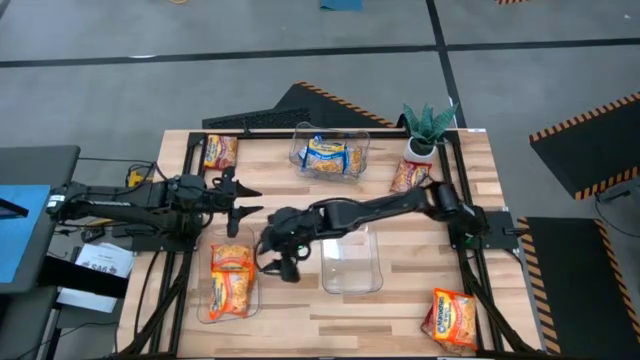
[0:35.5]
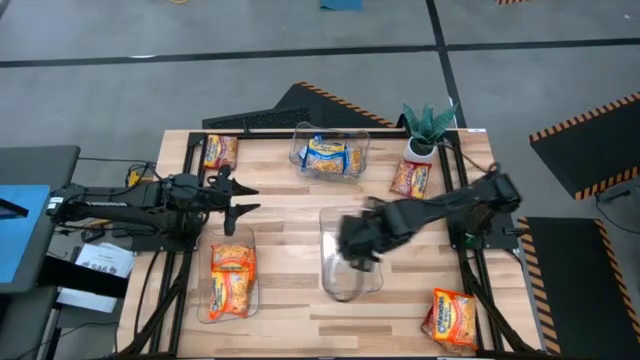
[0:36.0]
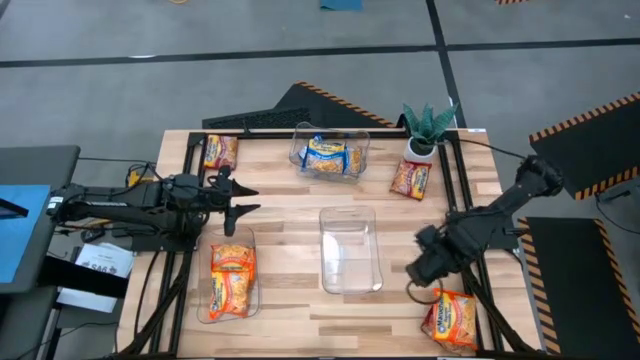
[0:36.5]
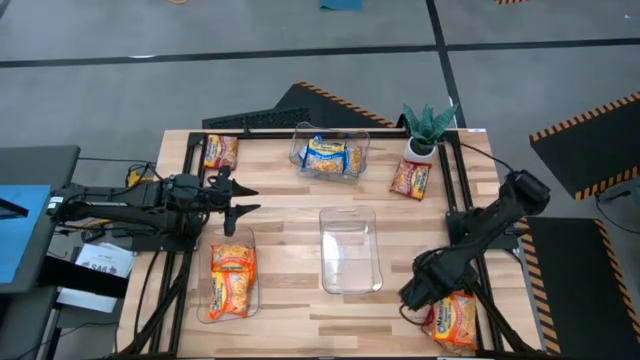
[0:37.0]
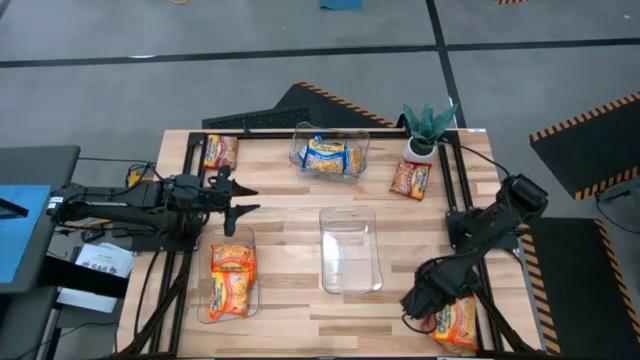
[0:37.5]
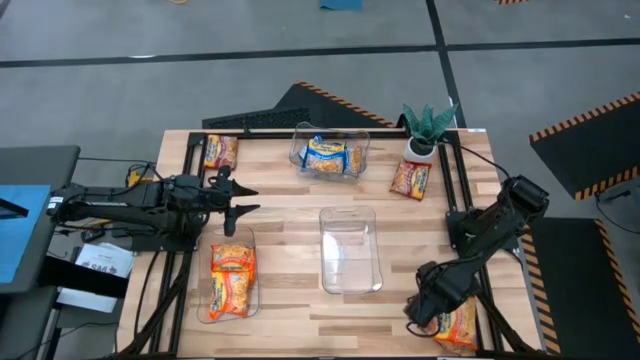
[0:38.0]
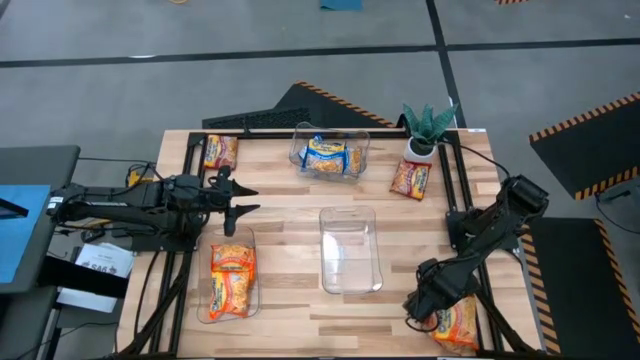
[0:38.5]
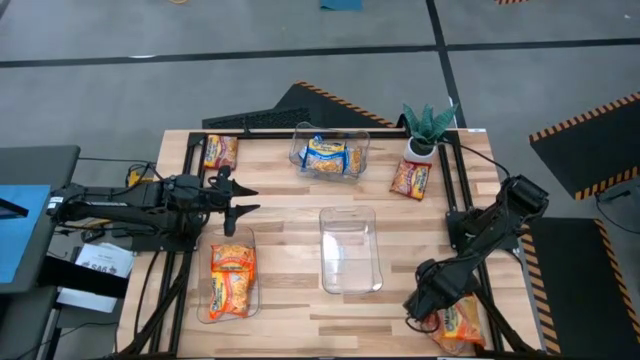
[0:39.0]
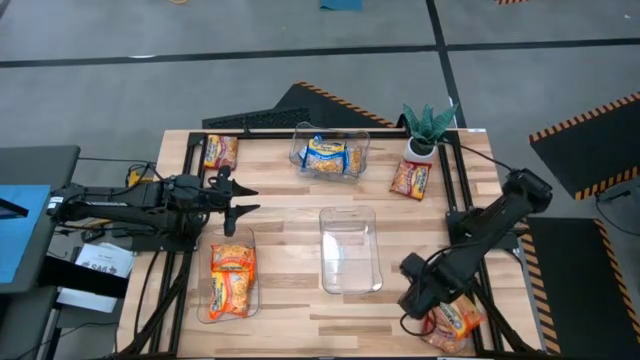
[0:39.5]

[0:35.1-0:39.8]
Task: Sort Maruchan noodles
Put the orange noodle pack into the bottom left transparent bin

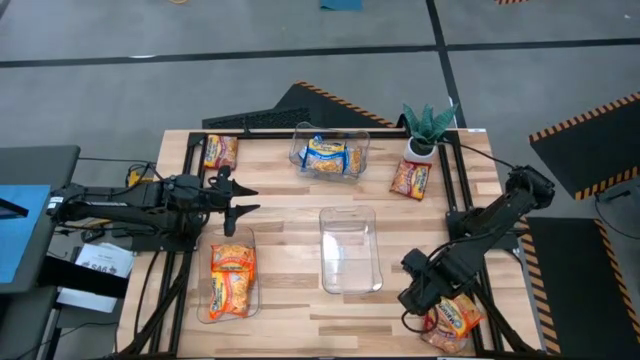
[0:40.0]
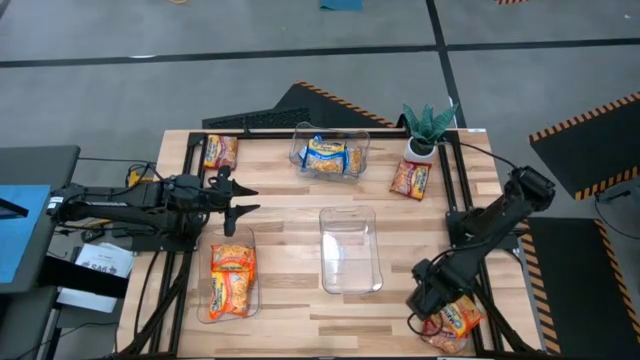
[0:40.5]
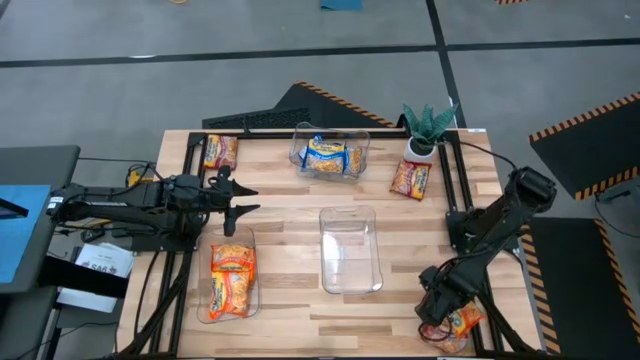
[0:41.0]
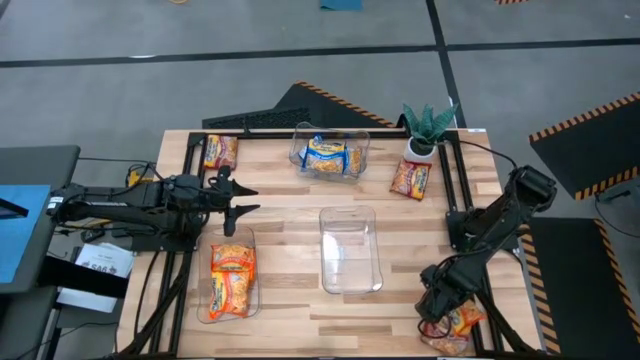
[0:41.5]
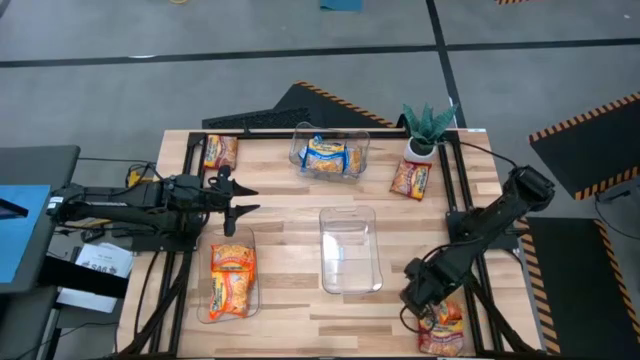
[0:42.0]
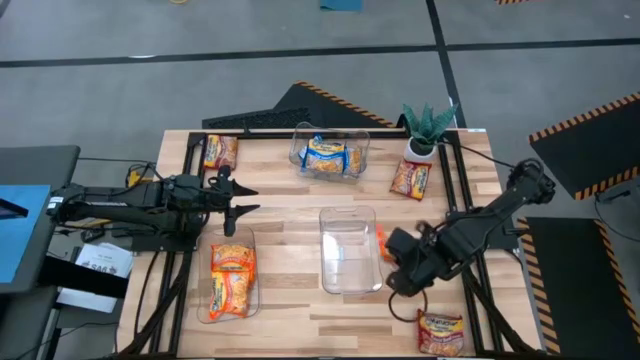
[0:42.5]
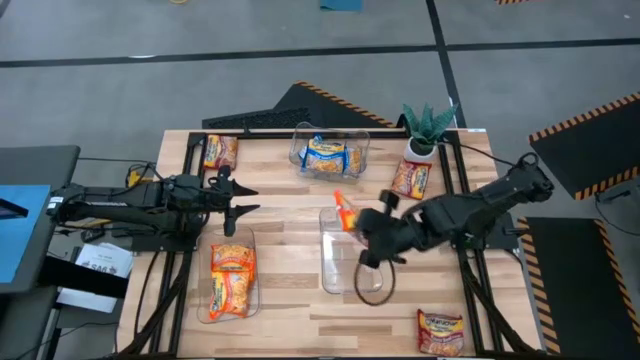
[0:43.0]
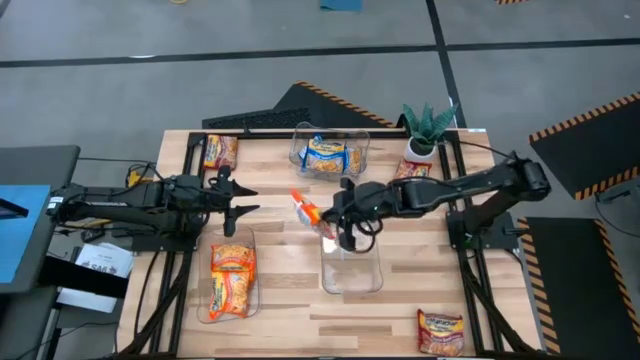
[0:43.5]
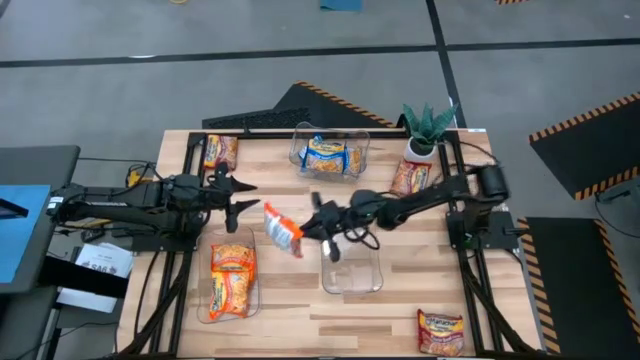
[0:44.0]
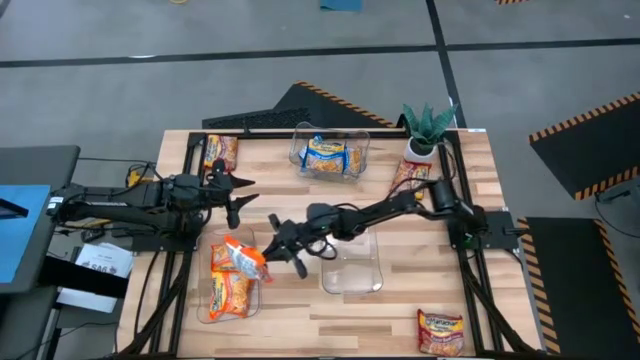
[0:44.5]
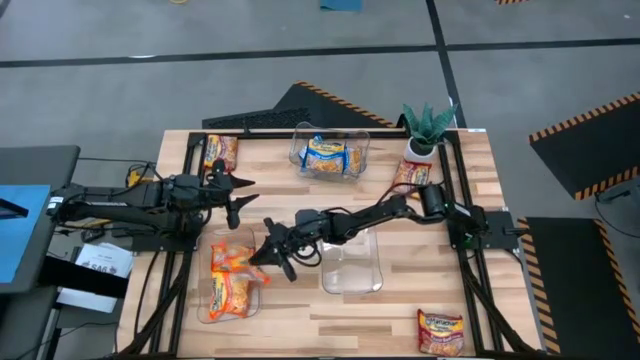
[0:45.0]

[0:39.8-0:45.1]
Put the orange noodle pack into the bottom left transparent bin

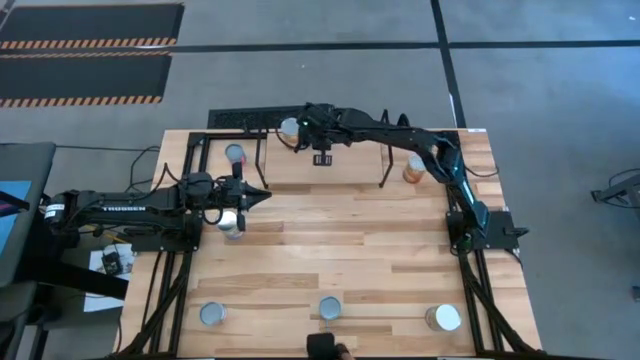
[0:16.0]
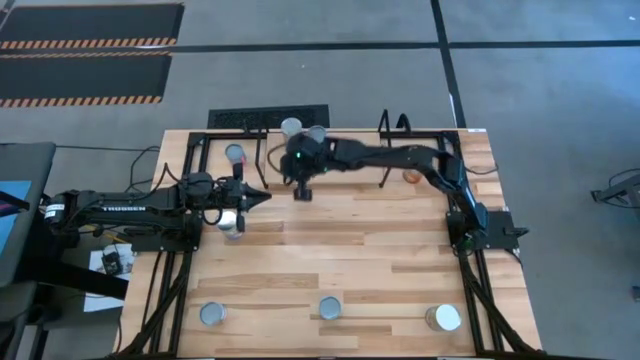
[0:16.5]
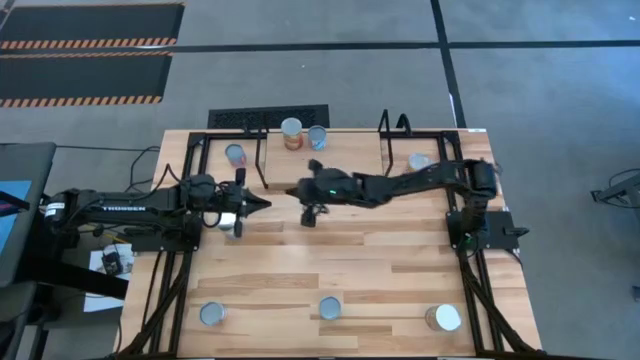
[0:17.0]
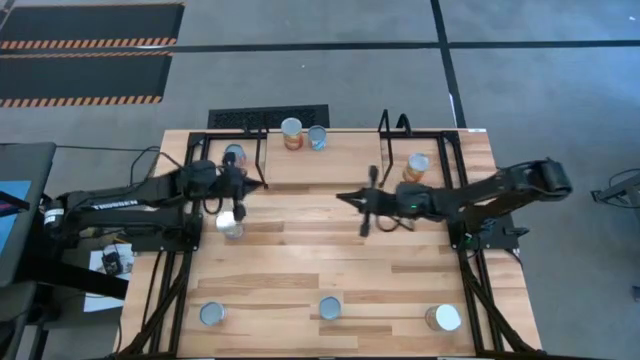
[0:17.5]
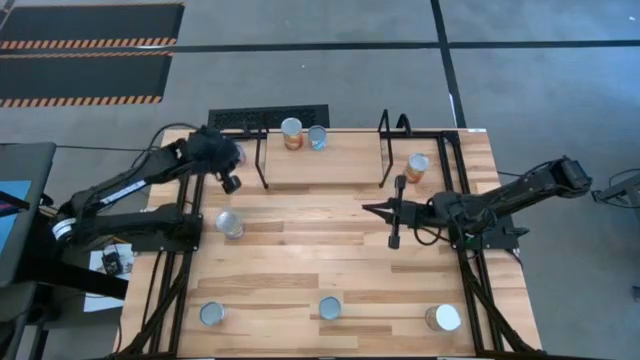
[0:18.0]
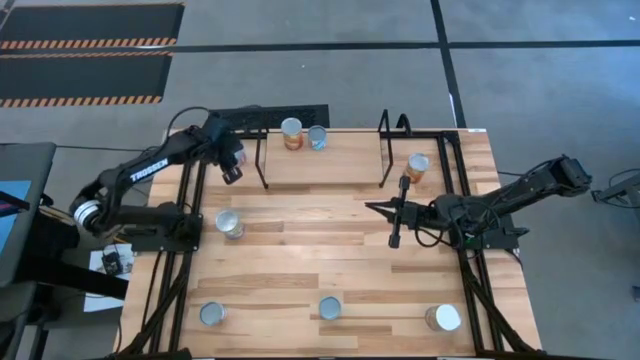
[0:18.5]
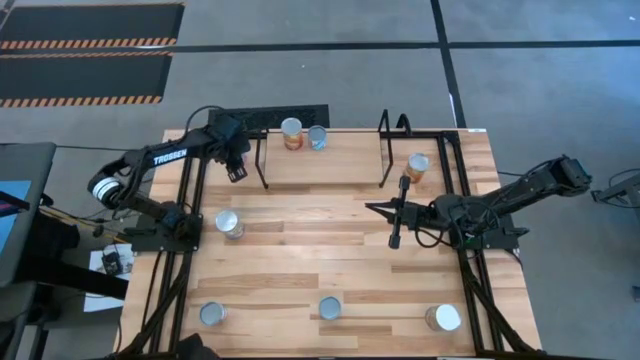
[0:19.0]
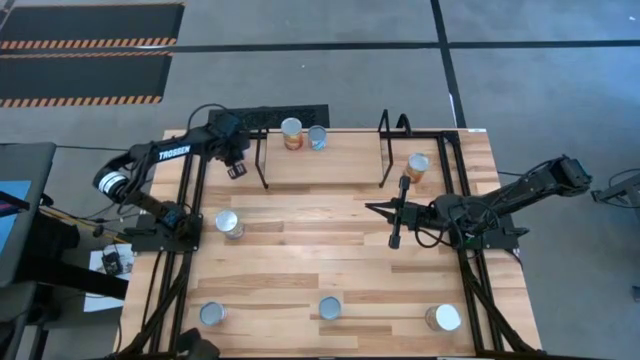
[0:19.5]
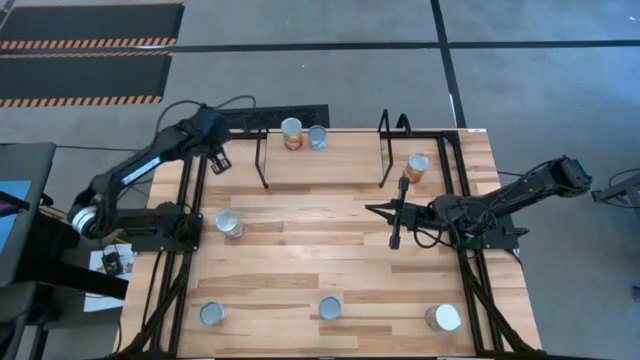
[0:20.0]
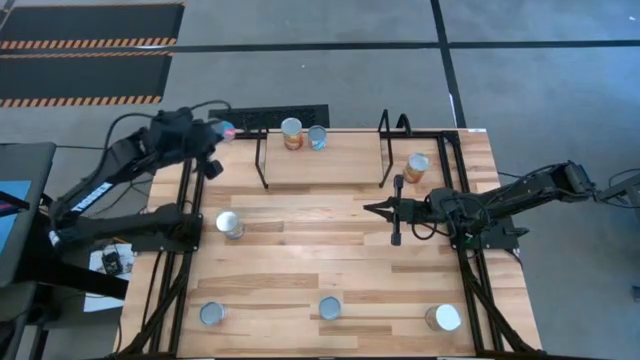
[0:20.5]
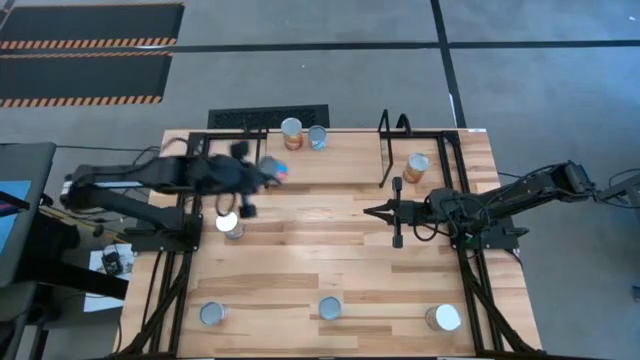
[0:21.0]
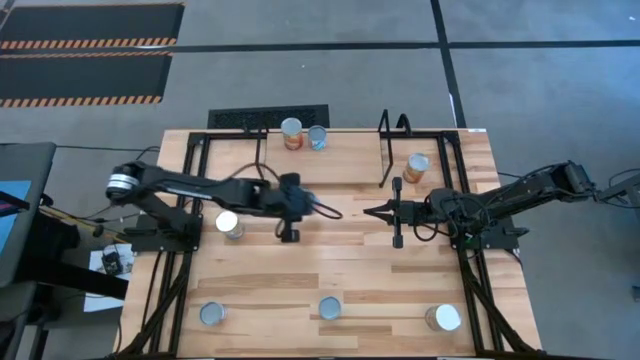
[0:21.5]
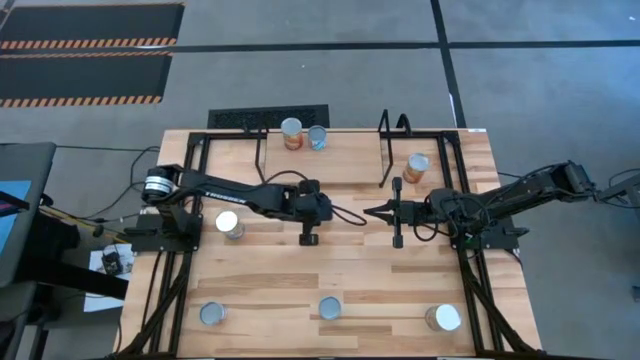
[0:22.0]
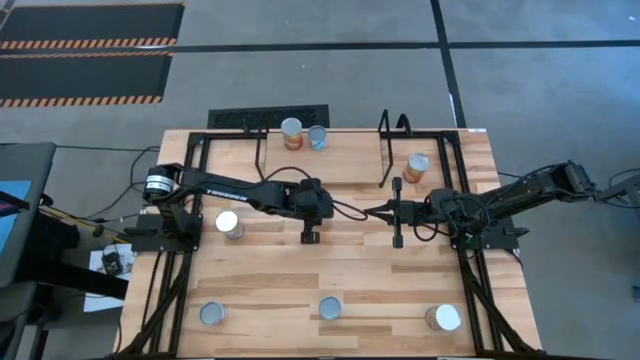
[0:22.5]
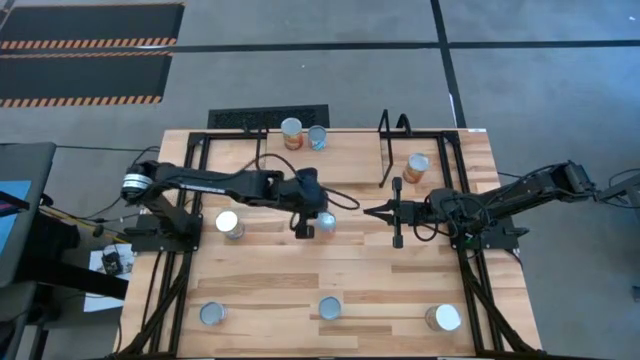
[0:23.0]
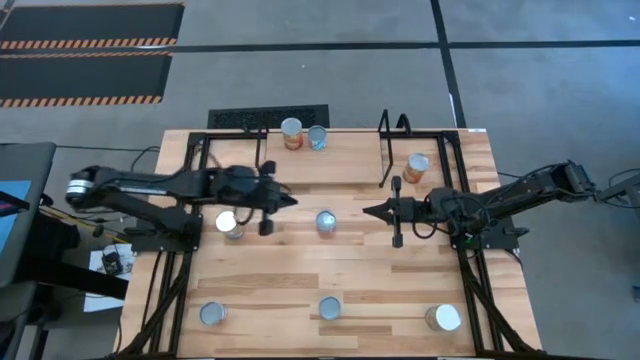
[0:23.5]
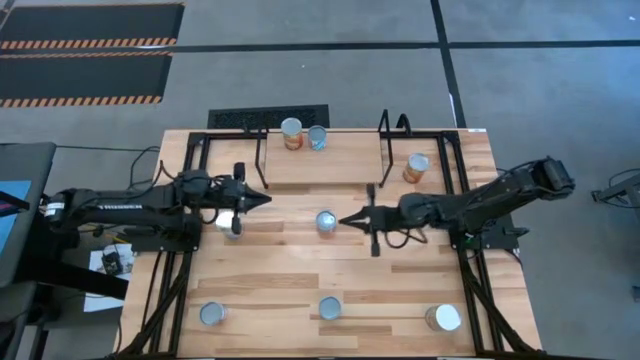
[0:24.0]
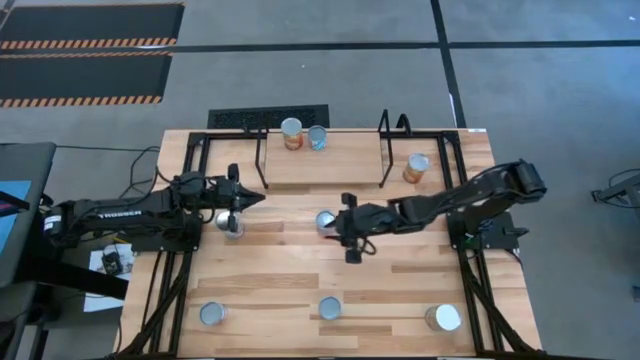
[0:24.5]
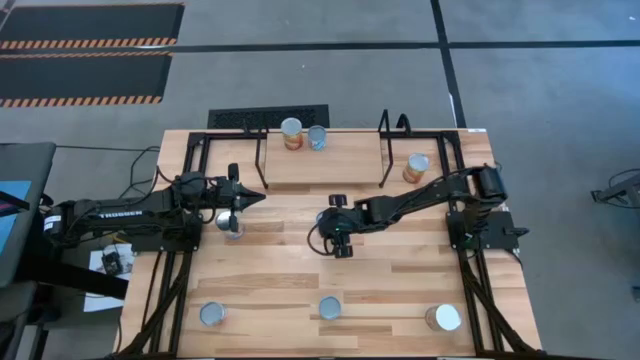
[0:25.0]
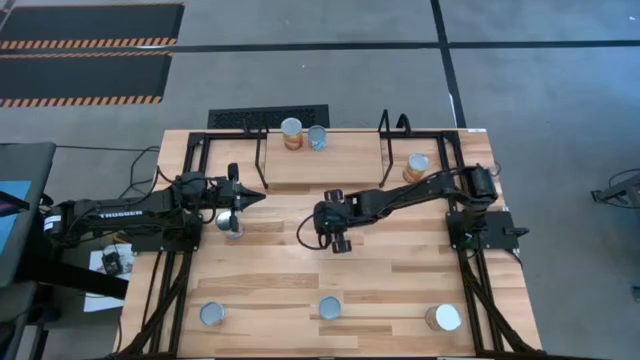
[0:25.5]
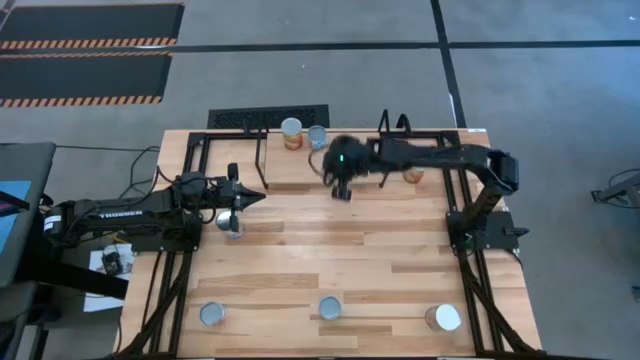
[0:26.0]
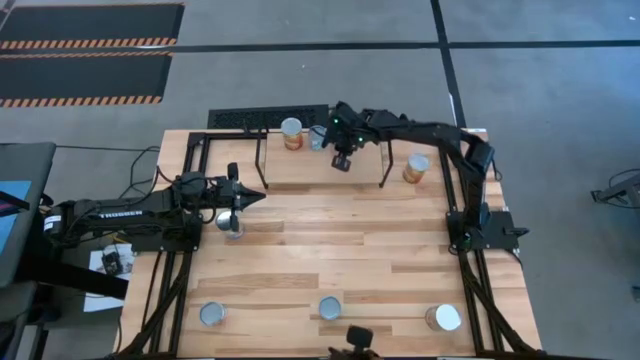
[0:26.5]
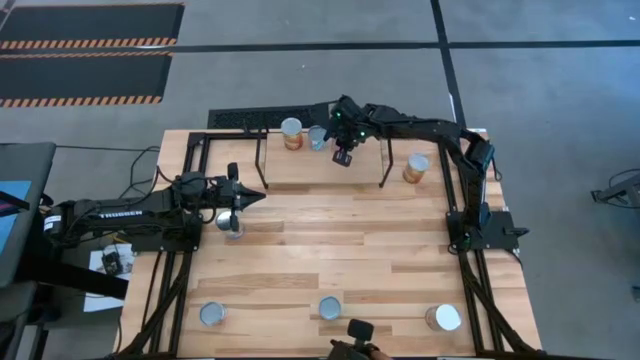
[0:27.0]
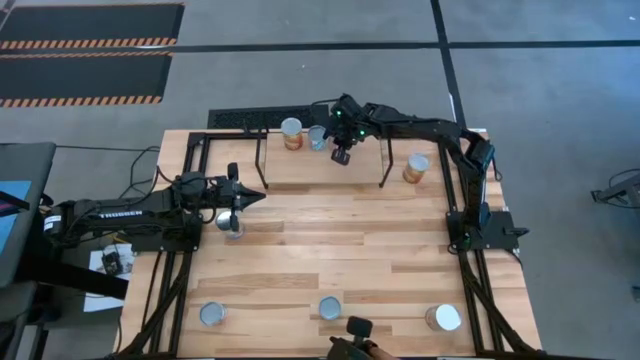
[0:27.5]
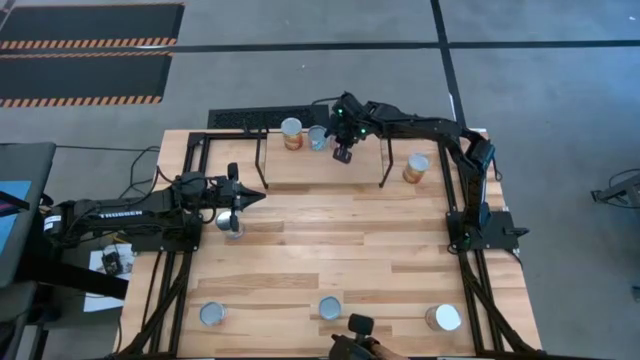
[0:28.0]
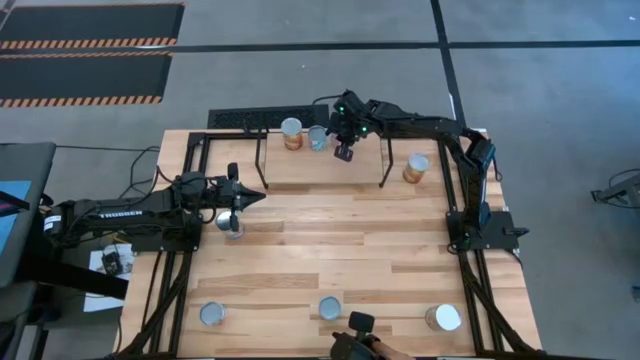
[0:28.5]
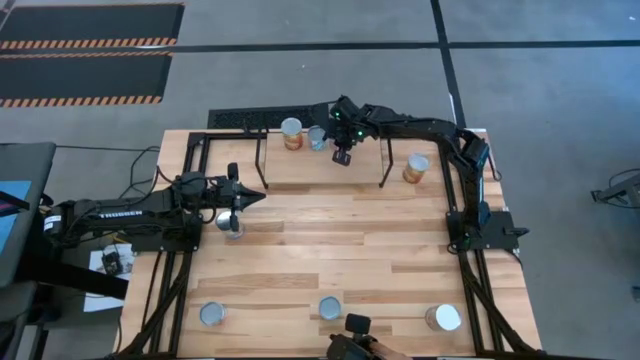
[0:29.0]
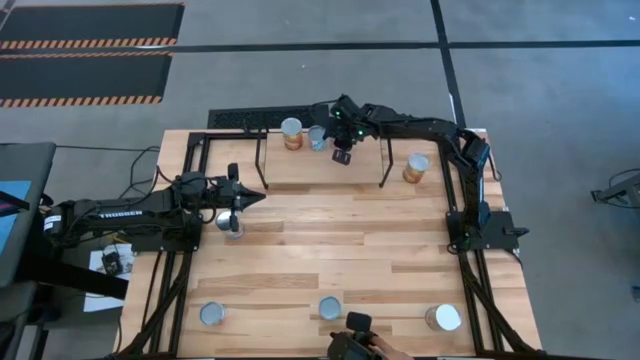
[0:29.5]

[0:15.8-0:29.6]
Task: Pick and place cans onto a shelf
Put the blue can on the shelf
